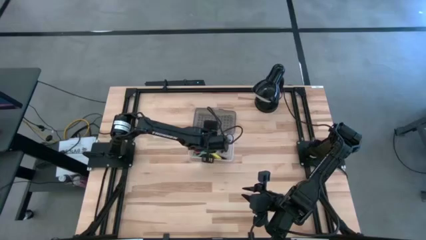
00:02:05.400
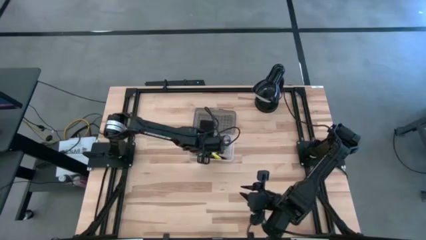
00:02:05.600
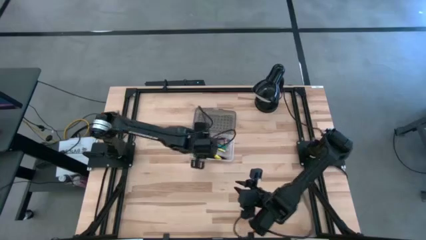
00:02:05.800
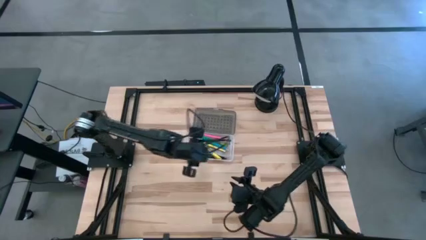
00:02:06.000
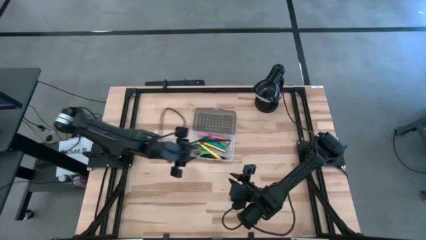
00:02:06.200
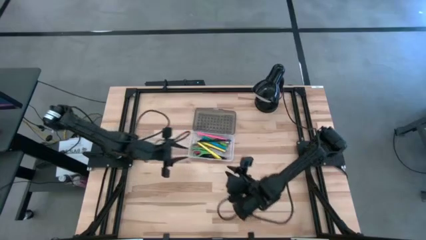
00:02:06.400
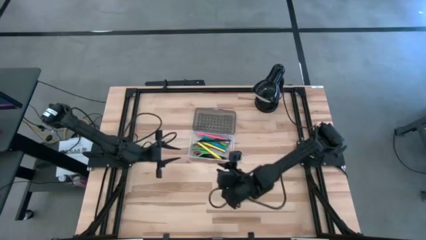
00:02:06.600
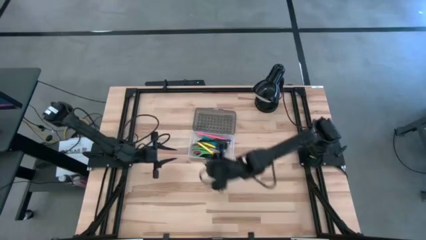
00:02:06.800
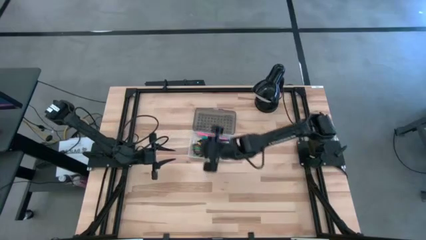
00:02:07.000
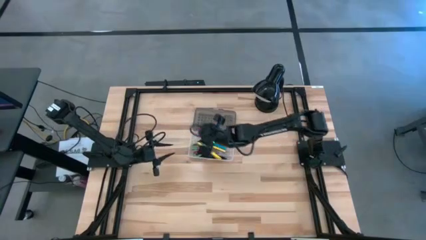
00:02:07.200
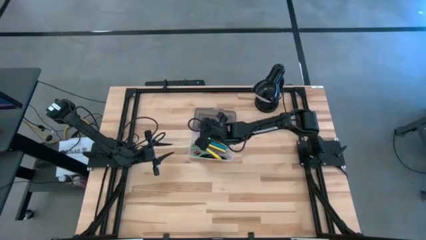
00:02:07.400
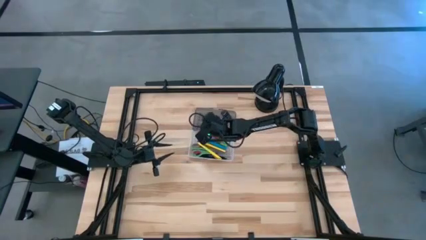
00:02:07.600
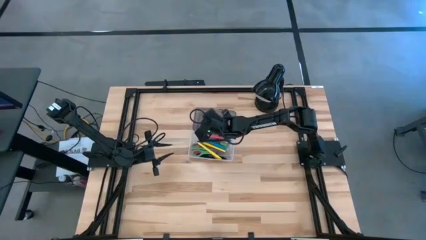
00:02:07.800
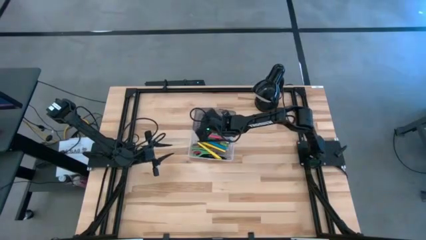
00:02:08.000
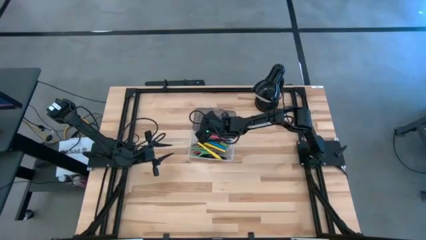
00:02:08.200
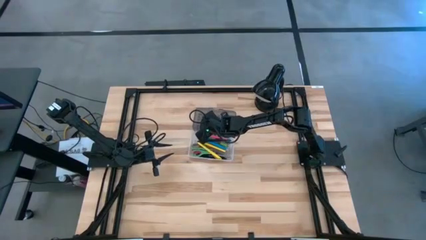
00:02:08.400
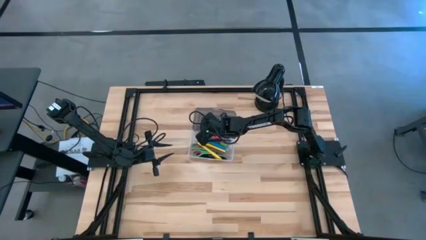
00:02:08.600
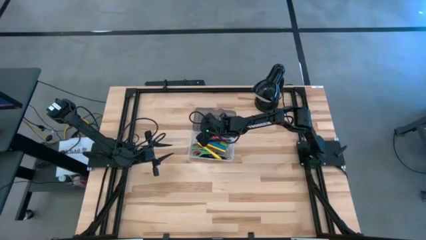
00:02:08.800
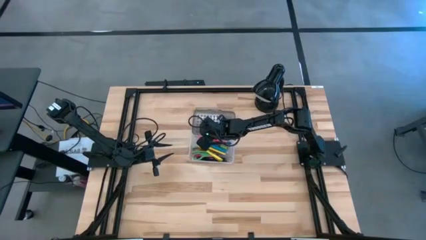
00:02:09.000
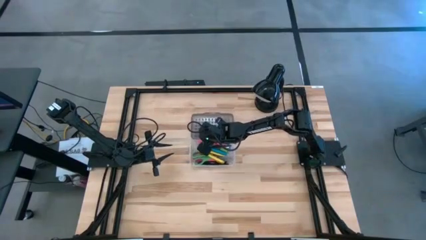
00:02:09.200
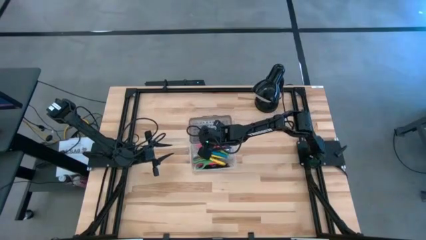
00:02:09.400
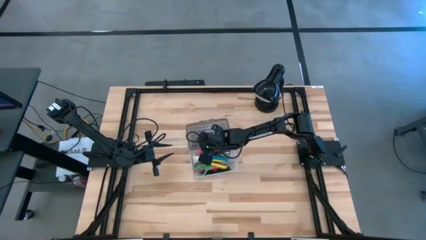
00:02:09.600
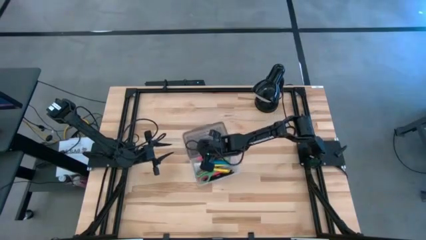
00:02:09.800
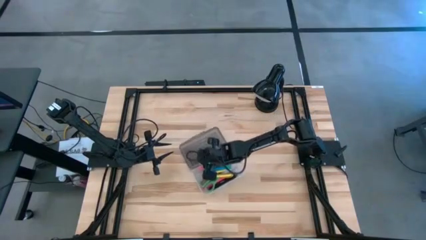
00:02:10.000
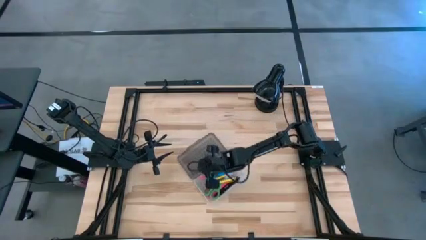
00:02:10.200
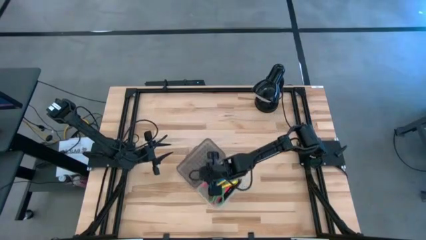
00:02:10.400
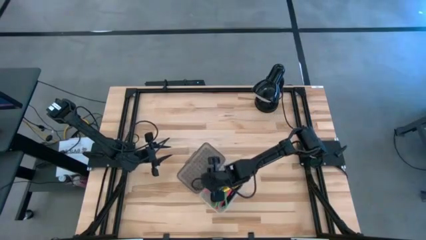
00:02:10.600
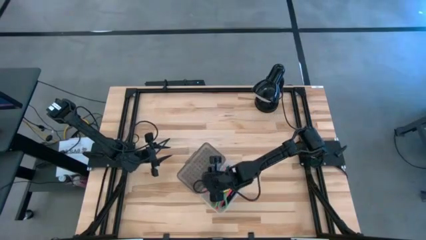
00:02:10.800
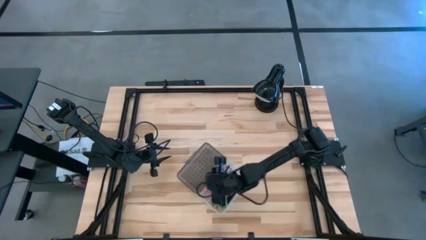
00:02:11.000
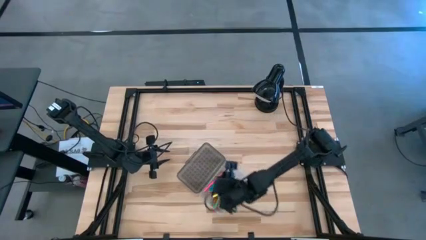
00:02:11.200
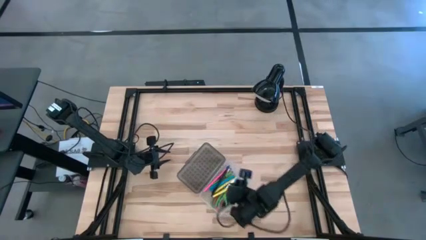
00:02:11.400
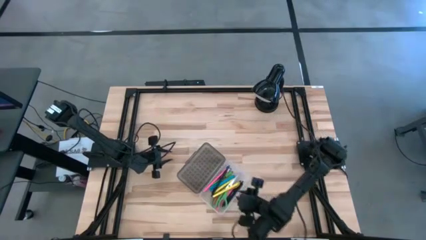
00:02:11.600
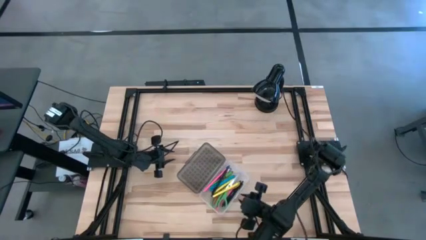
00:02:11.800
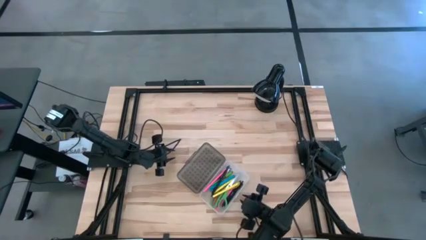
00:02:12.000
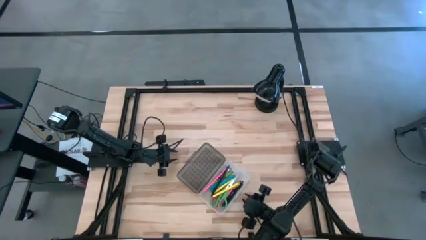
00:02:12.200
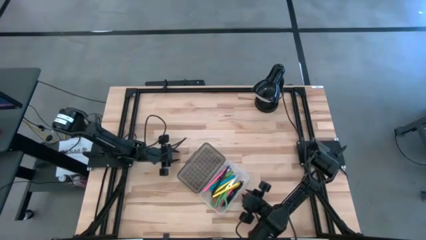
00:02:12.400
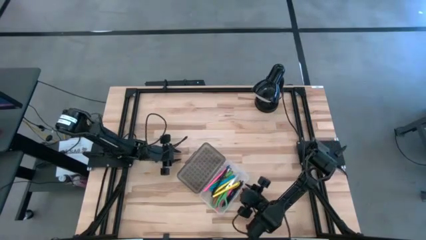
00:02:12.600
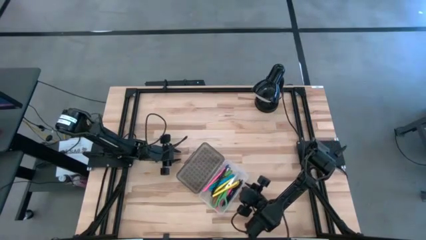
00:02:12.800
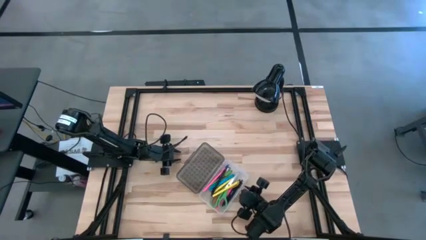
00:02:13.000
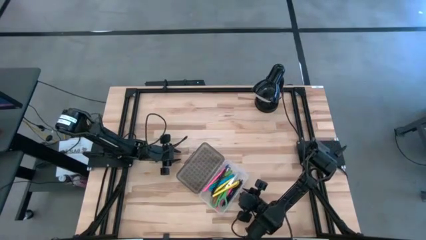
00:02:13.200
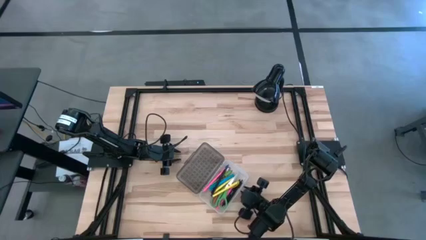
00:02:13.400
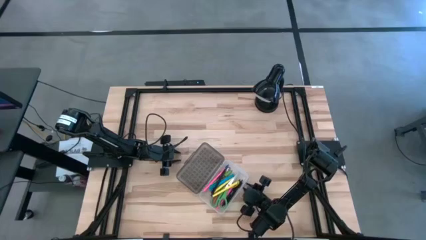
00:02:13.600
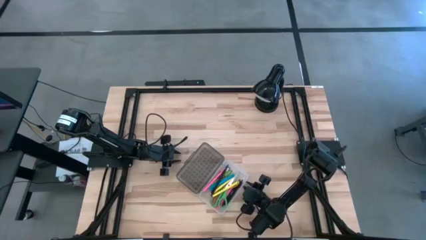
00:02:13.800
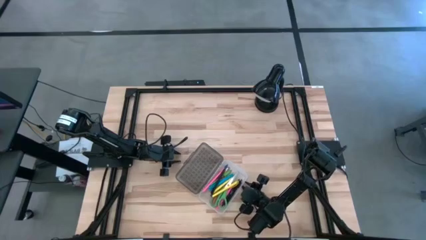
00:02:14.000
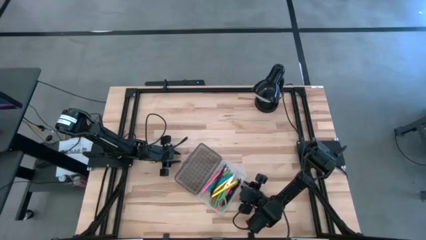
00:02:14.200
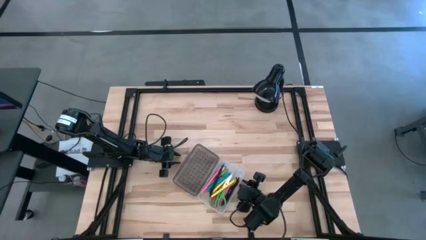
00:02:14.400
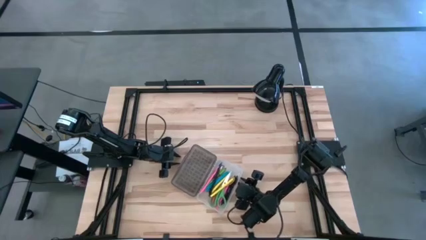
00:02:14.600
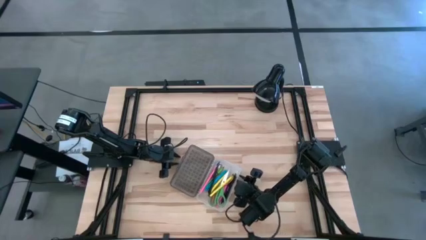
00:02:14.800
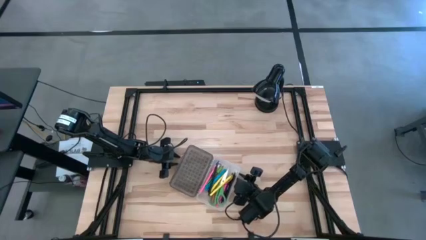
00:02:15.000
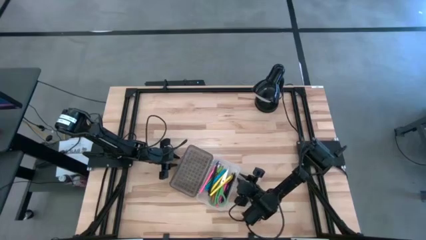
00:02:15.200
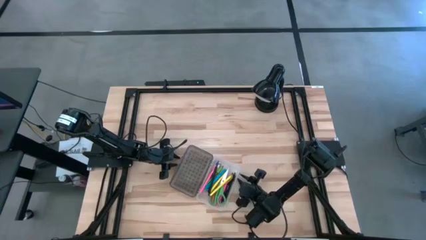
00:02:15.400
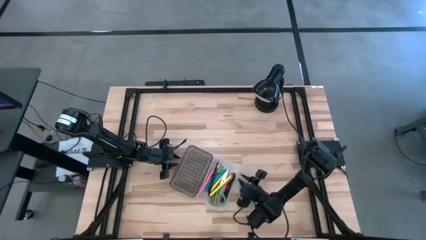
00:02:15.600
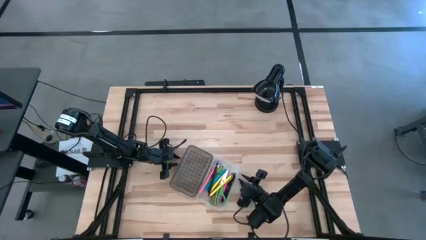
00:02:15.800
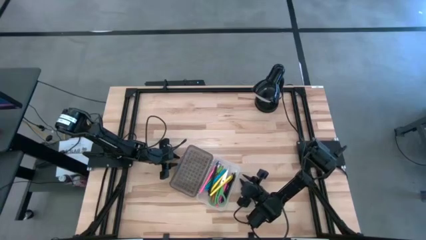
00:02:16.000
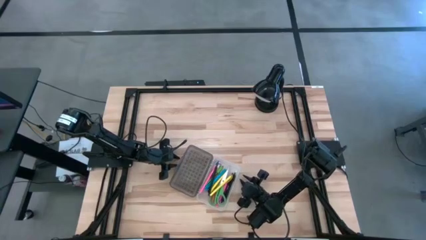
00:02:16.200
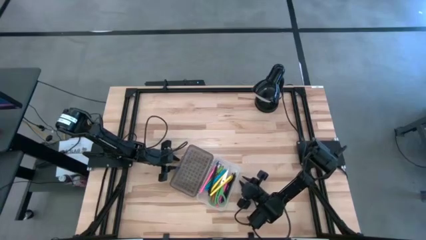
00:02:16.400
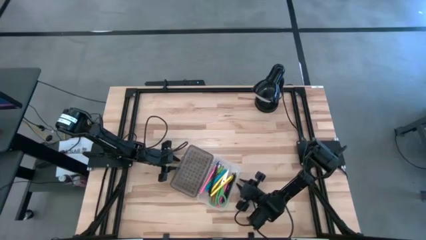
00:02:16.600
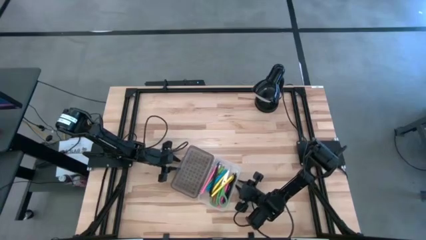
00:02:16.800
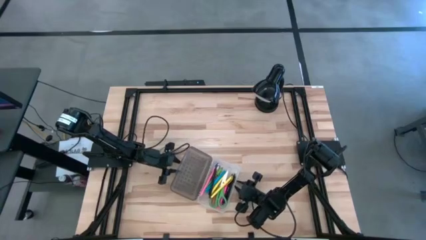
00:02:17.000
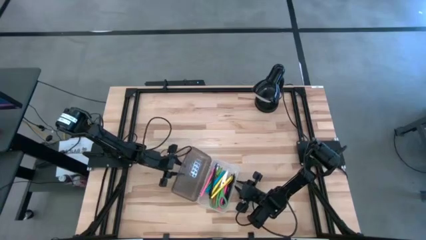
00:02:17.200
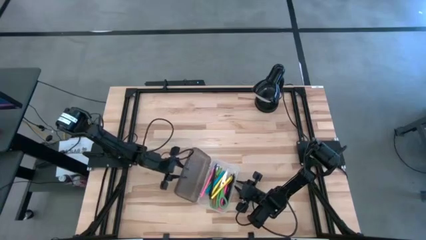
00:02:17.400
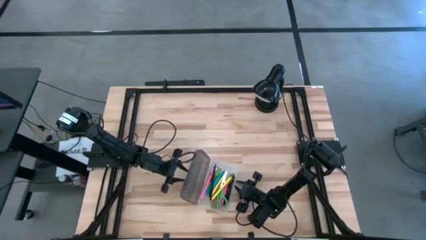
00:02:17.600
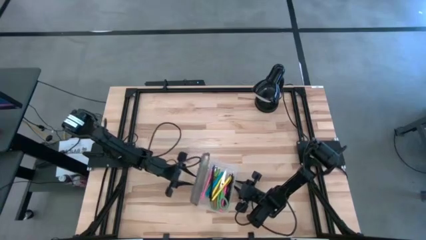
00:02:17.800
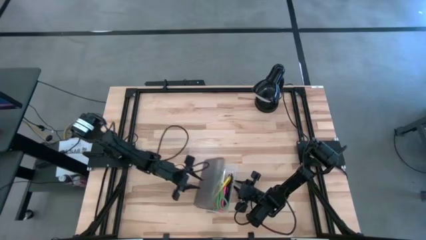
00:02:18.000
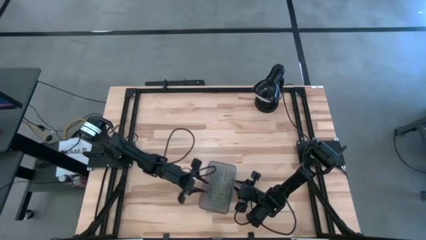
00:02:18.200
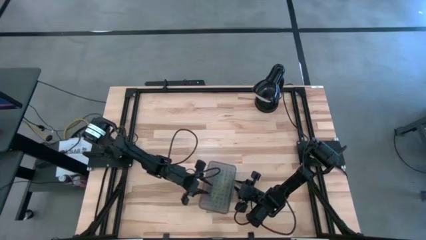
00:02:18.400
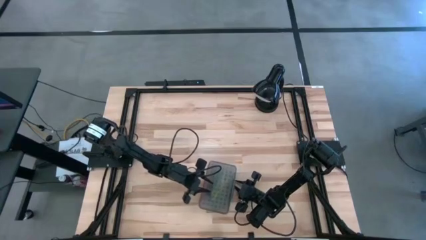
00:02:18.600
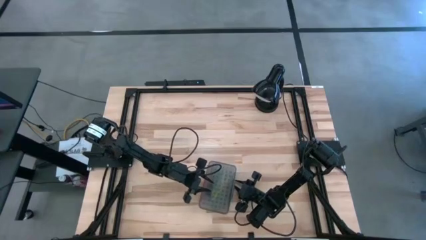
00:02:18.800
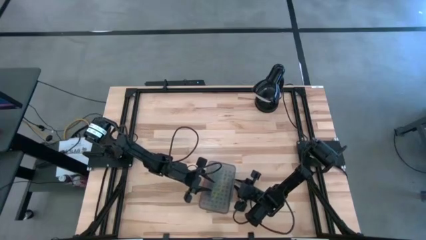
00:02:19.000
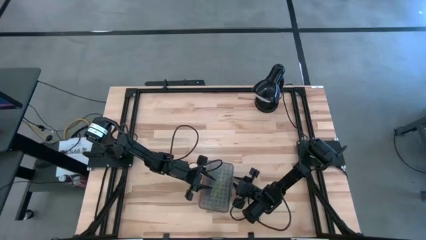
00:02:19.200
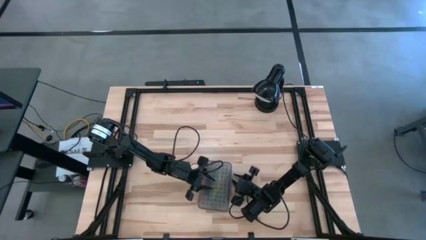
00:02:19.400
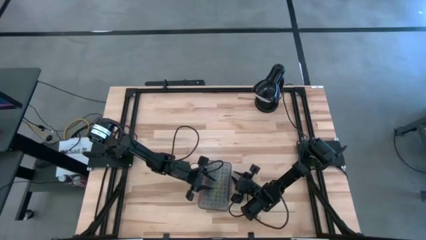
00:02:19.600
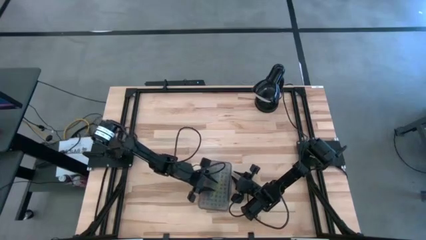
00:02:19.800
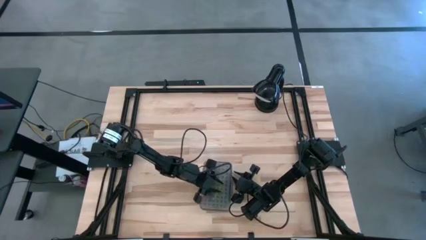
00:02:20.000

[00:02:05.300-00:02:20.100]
Task: Pick & place school supplies into a supply box
Close the transparent supply box
